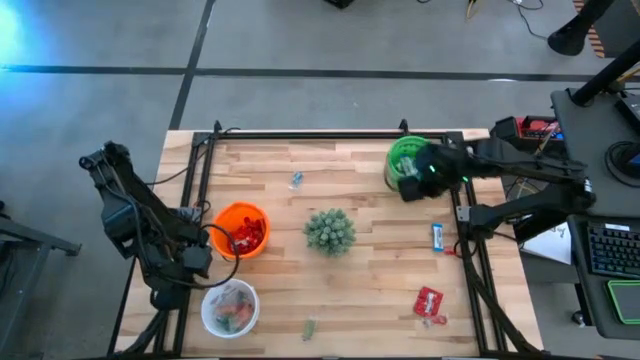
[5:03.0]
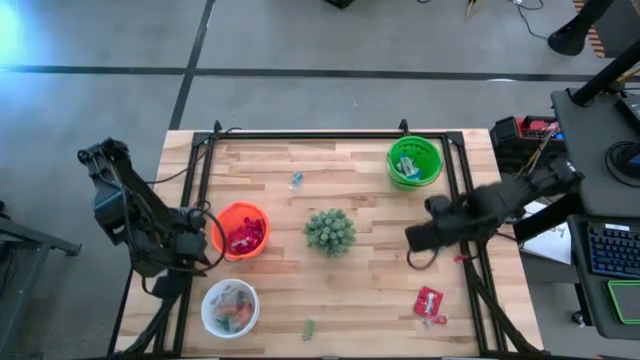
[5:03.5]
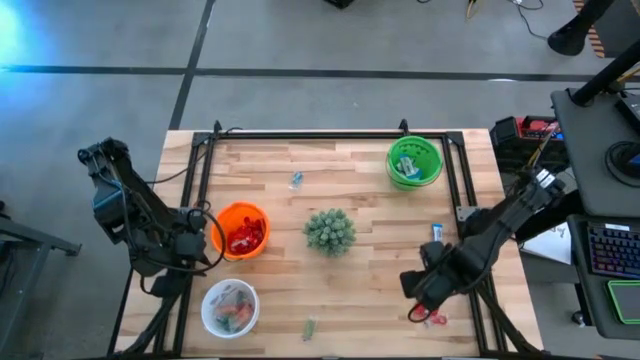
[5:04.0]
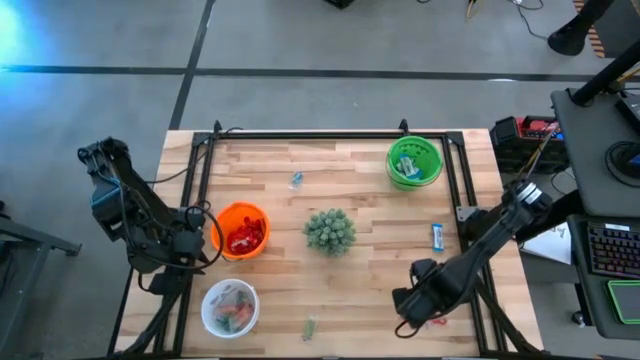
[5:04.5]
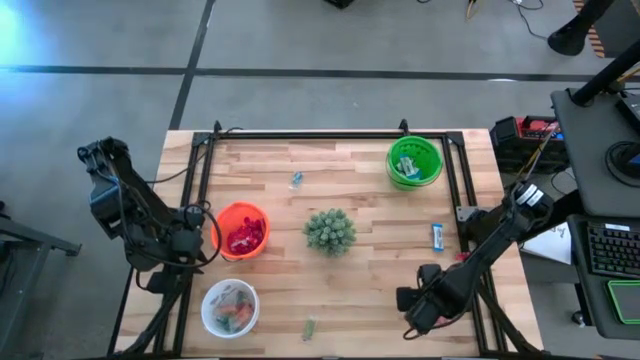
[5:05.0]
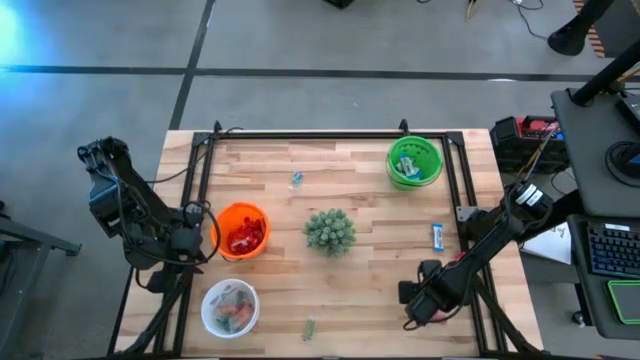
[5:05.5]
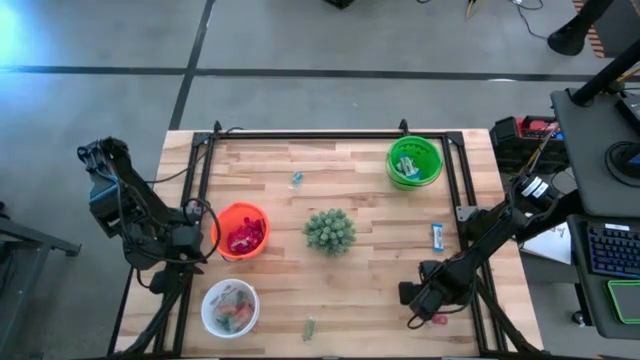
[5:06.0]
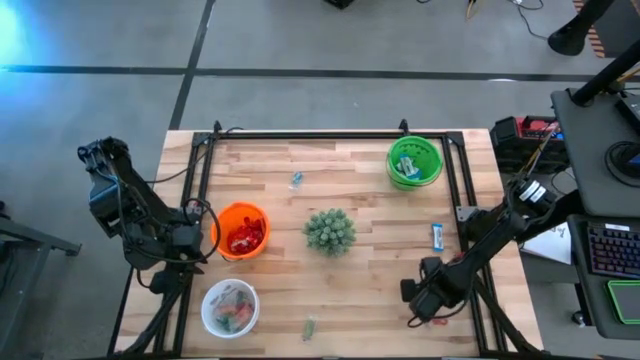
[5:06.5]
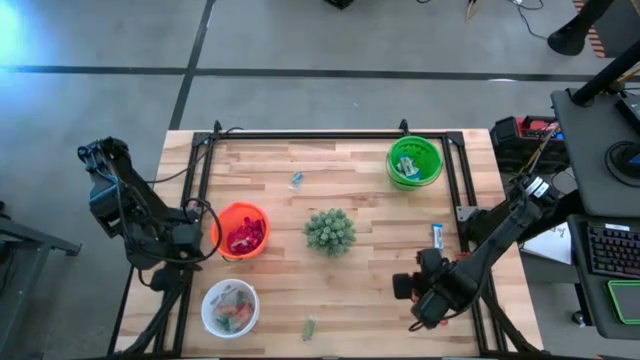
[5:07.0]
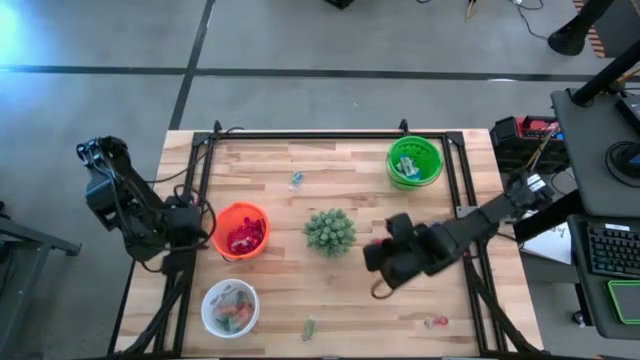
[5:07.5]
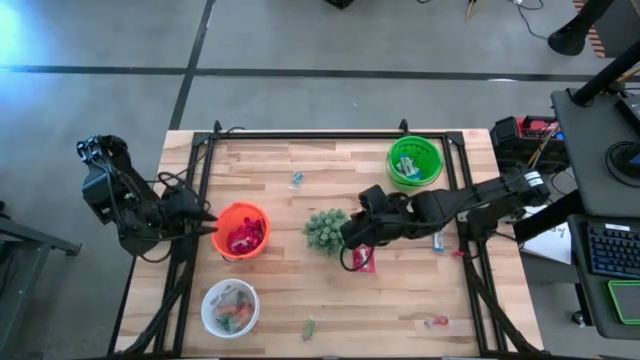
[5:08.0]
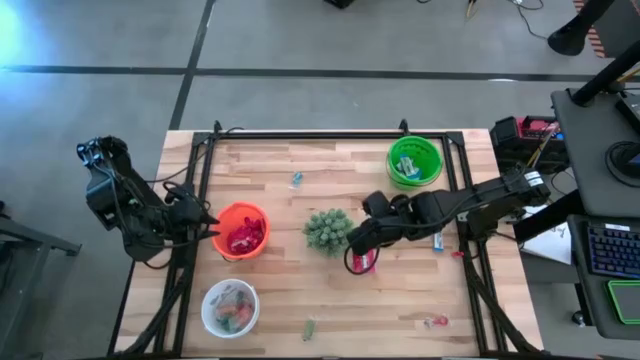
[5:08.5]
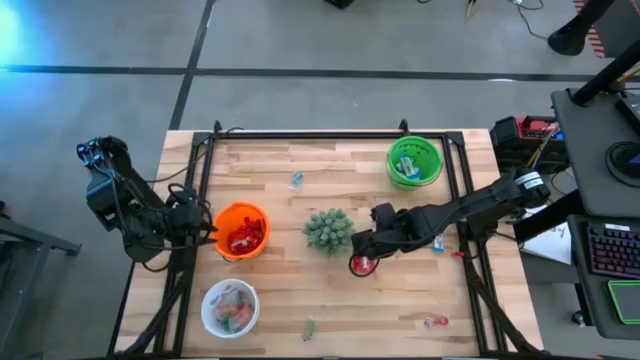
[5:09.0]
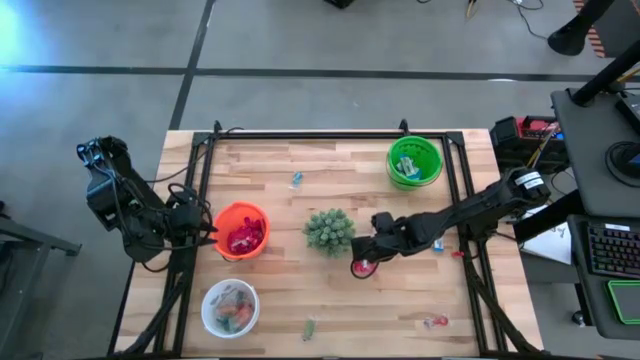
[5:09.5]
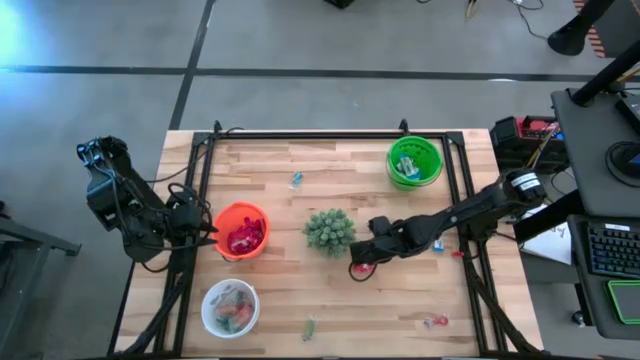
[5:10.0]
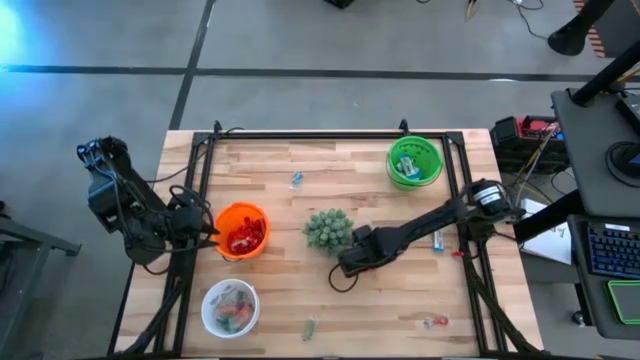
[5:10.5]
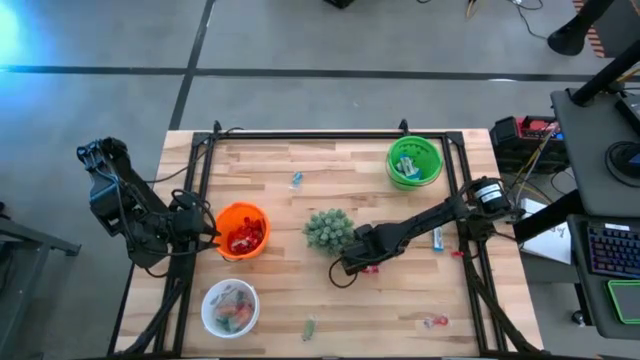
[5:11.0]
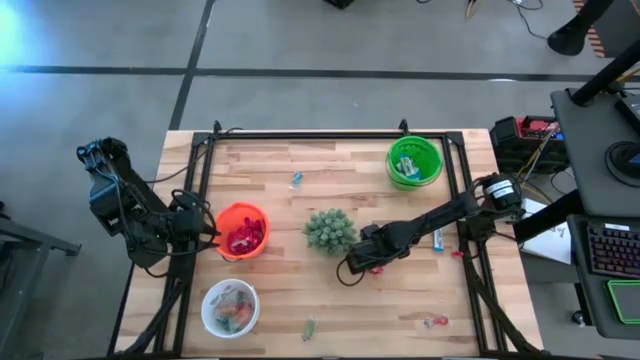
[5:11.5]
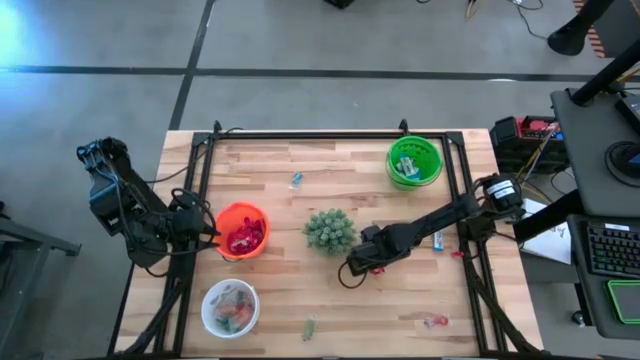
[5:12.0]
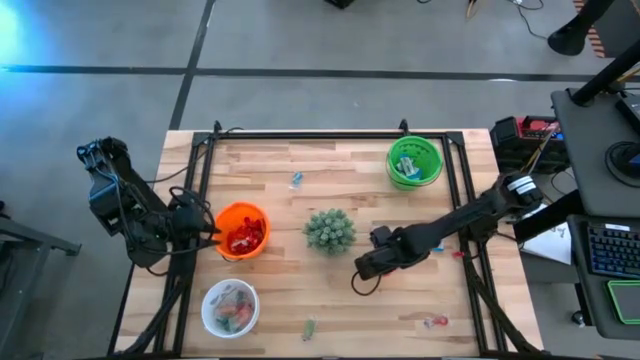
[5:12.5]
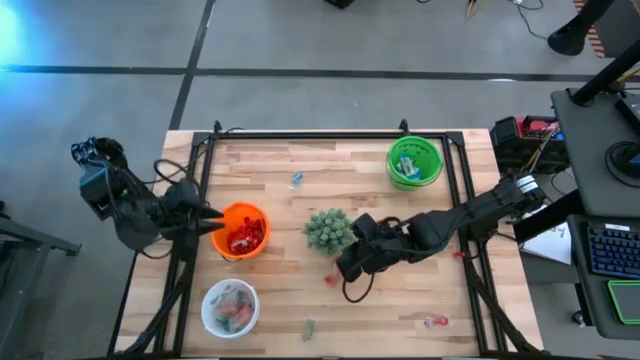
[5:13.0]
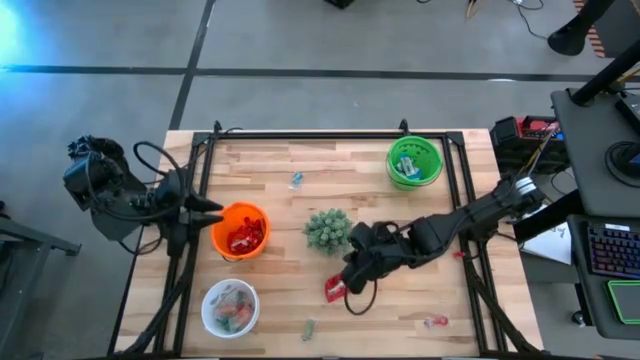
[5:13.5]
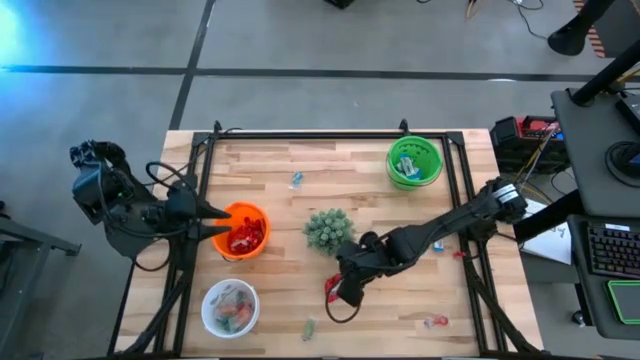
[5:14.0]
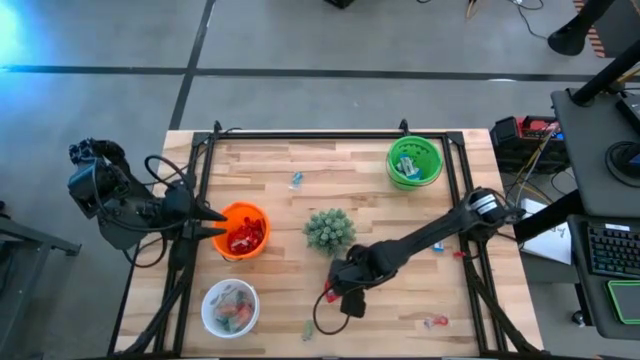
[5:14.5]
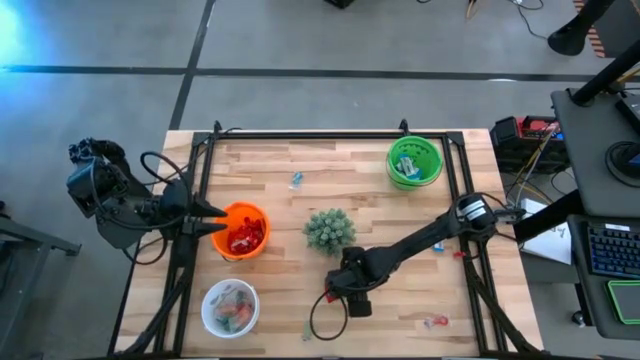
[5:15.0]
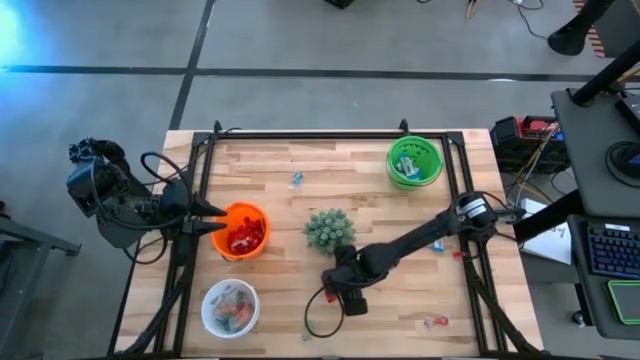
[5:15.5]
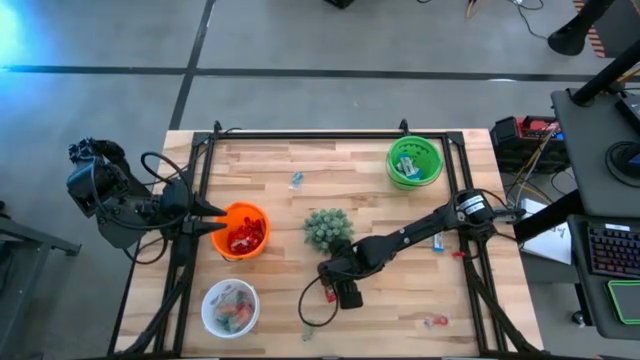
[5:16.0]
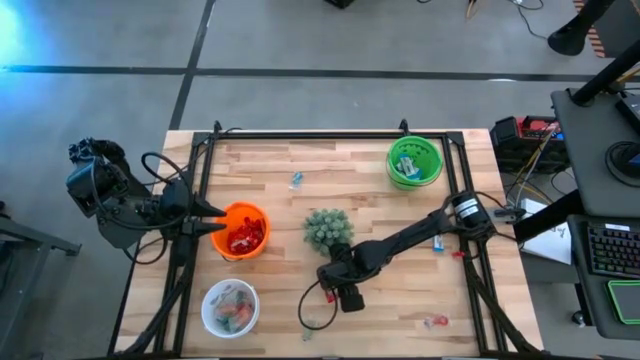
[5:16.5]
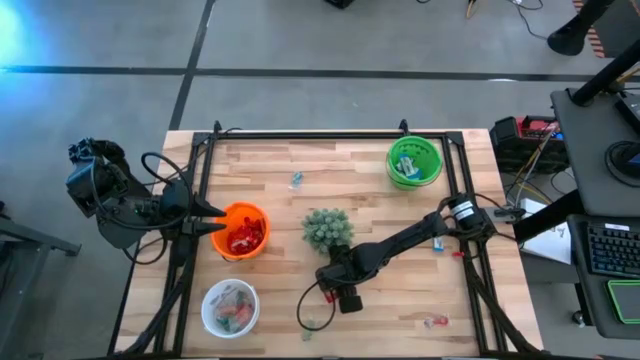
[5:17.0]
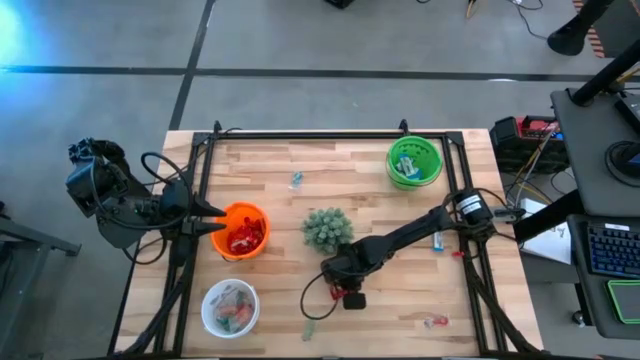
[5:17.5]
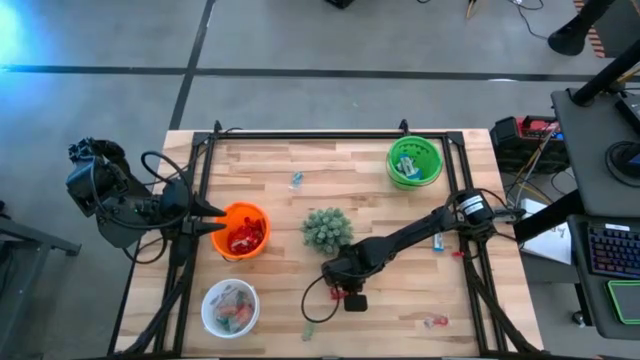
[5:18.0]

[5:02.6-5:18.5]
Task: Sort candy
Put the red candy into the orange bucket

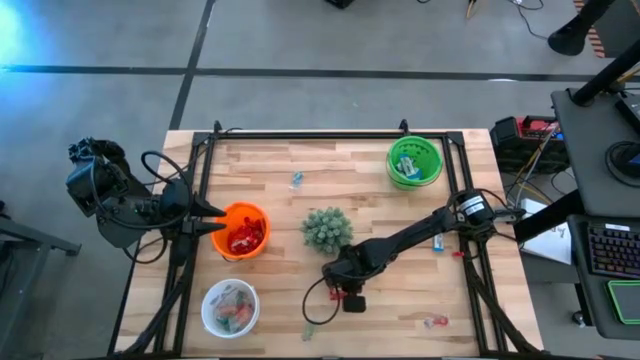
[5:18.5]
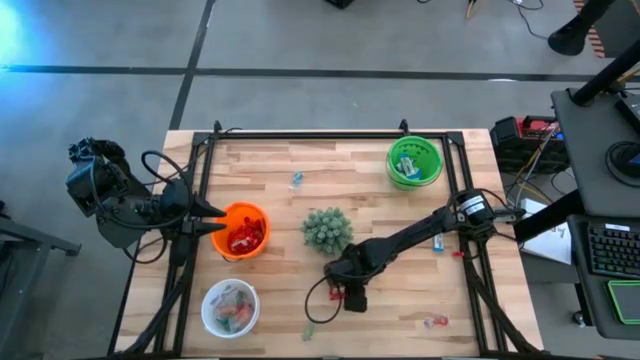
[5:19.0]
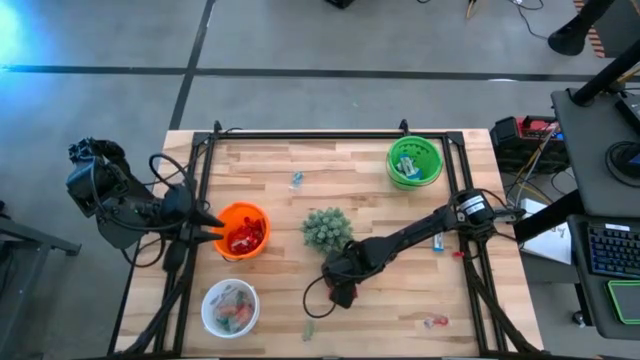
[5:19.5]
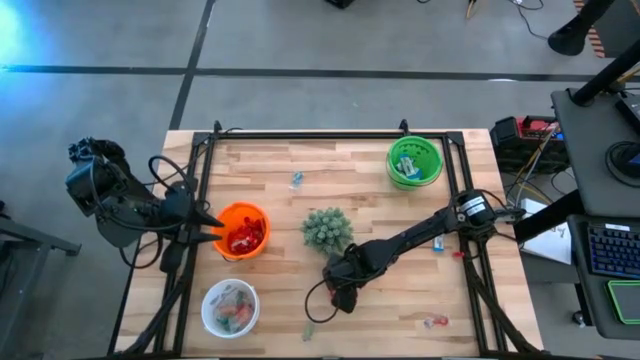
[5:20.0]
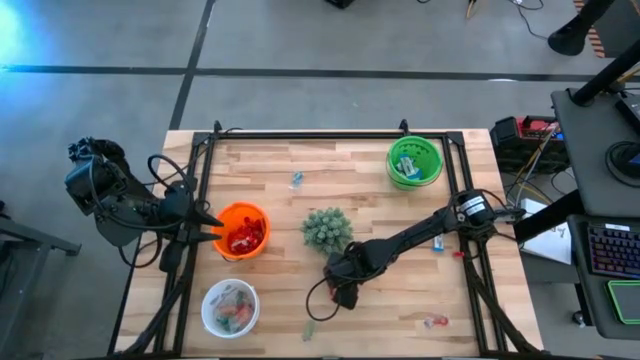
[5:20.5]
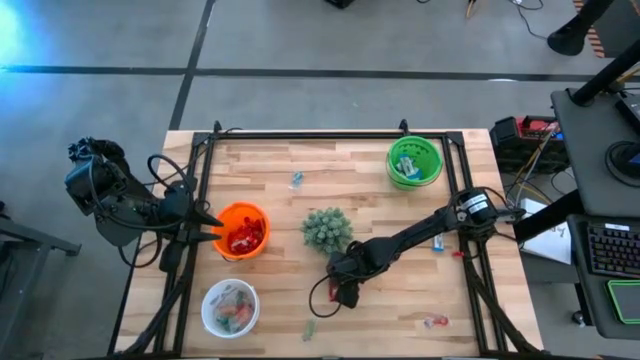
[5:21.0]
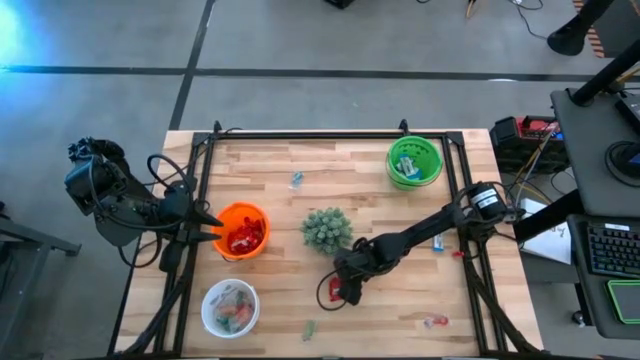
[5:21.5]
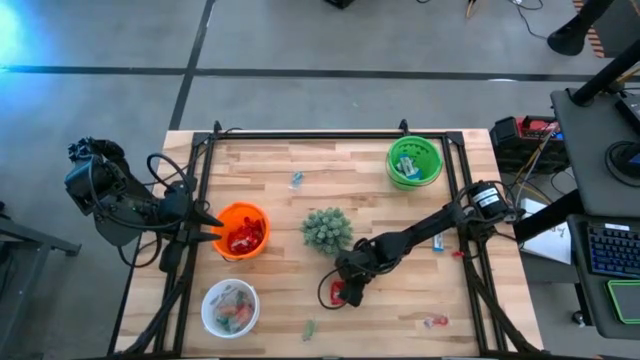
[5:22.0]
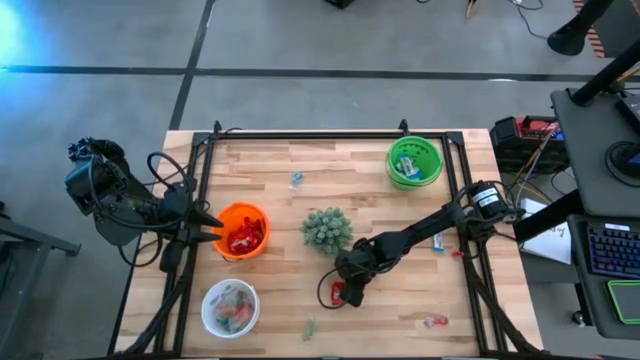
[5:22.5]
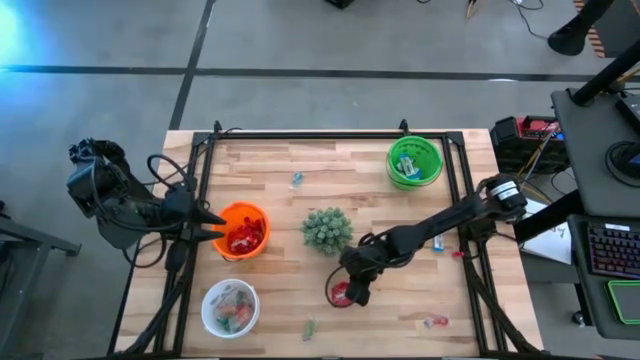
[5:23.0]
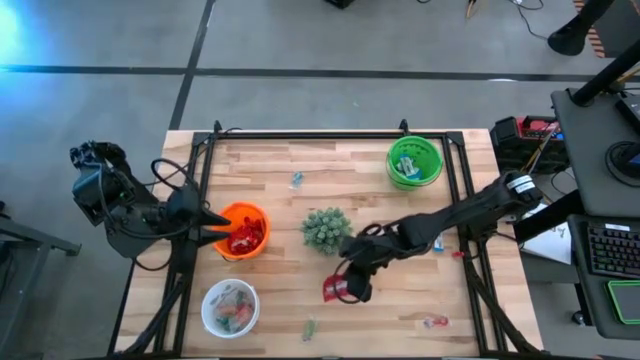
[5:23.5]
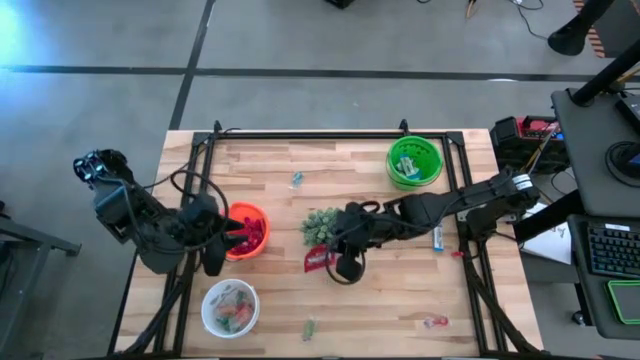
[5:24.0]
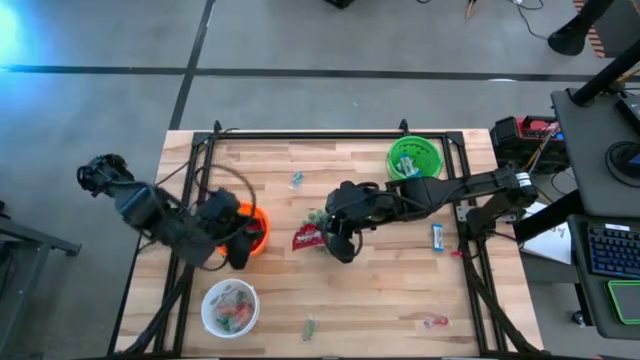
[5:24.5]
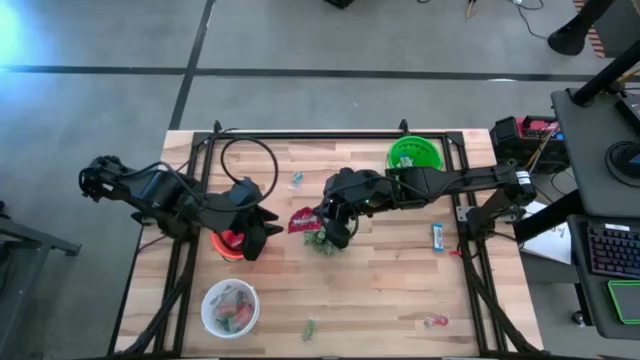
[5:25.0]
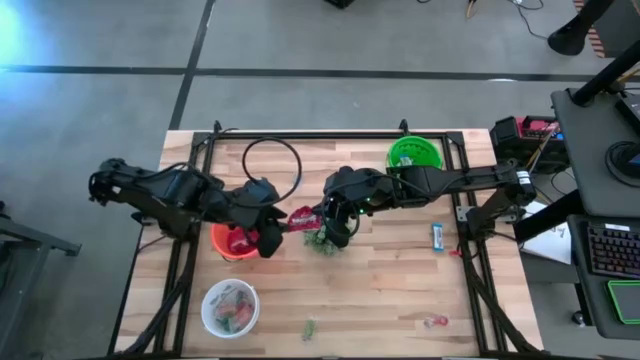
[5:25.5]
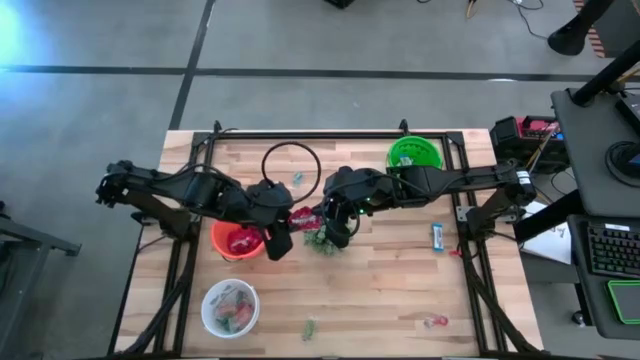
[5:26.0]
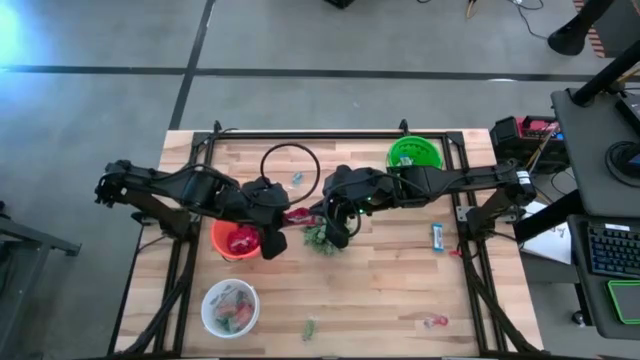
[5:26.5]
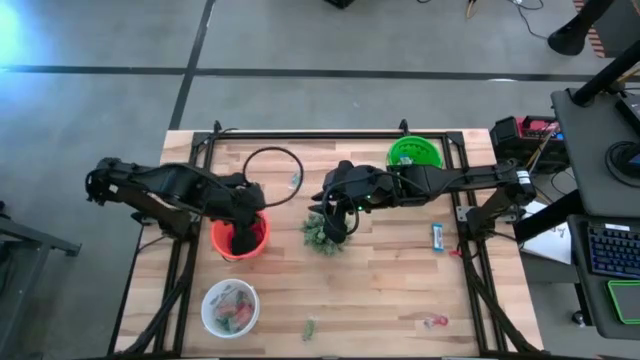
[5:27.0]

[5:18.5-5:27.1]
Put the red candy into the orange bucket
